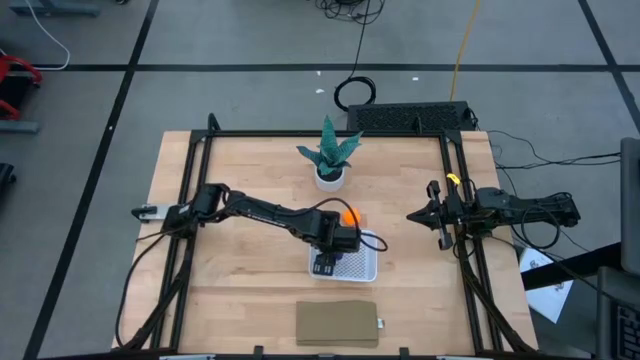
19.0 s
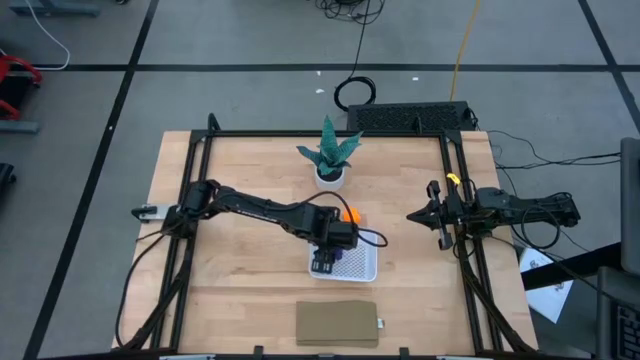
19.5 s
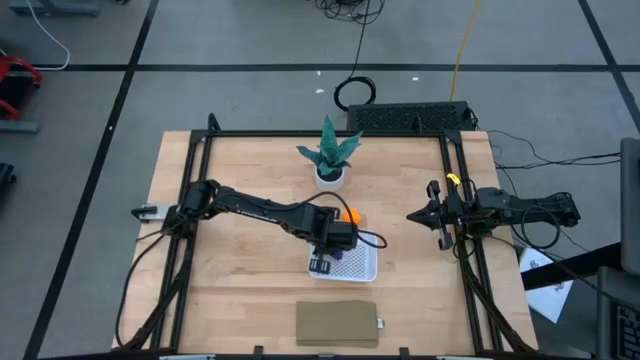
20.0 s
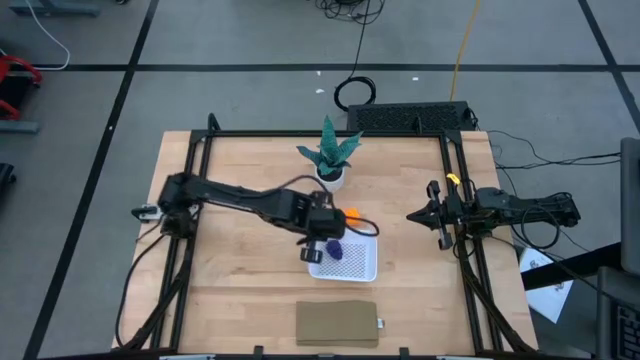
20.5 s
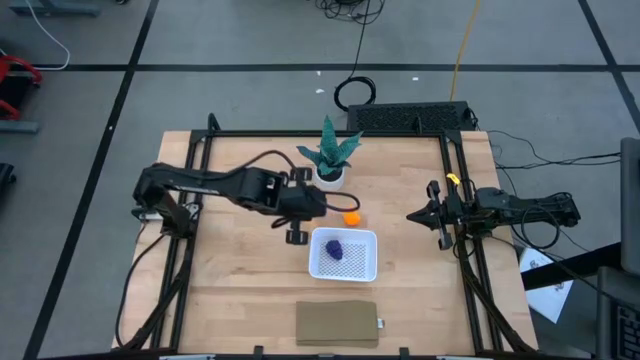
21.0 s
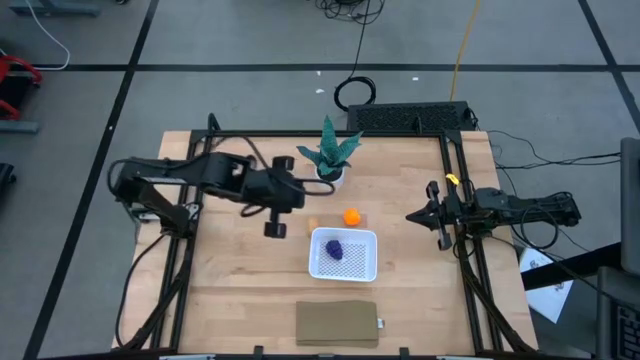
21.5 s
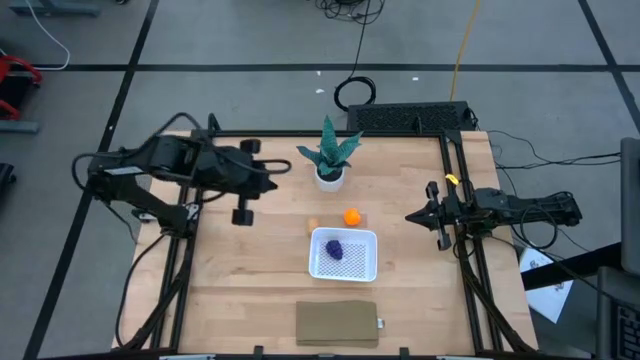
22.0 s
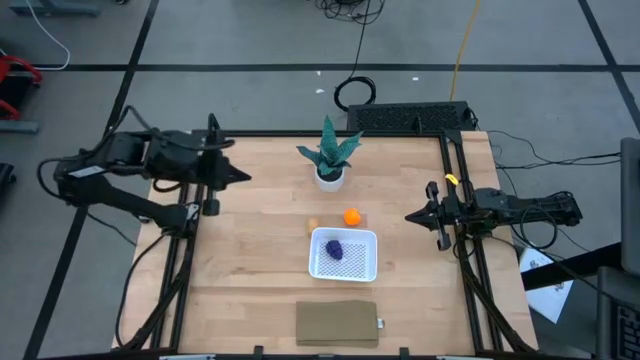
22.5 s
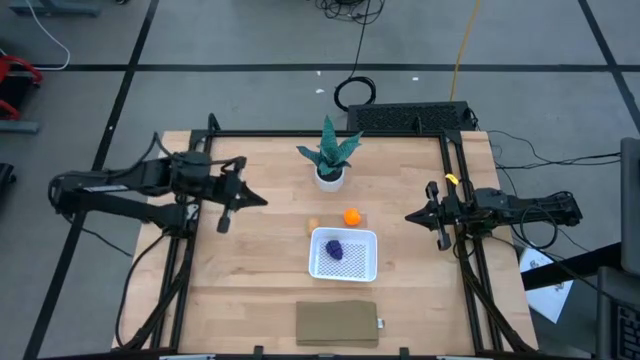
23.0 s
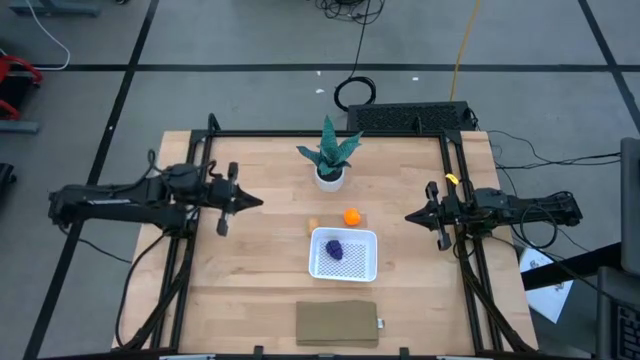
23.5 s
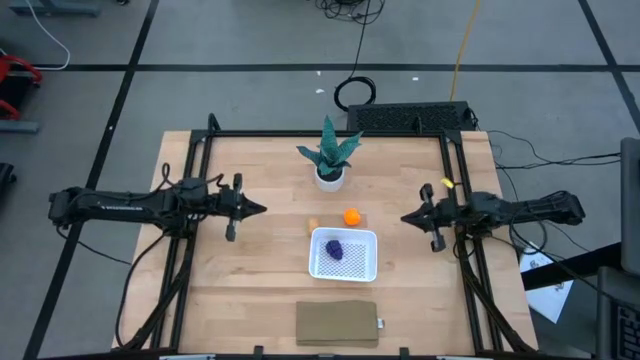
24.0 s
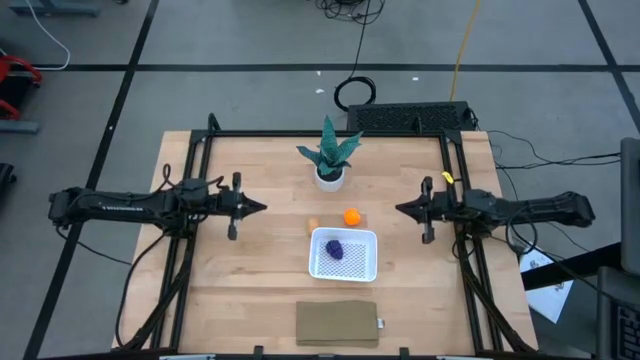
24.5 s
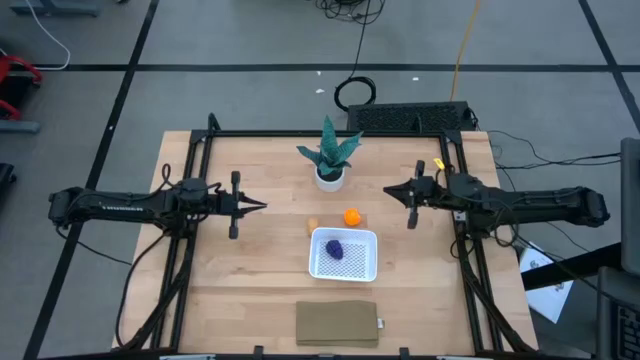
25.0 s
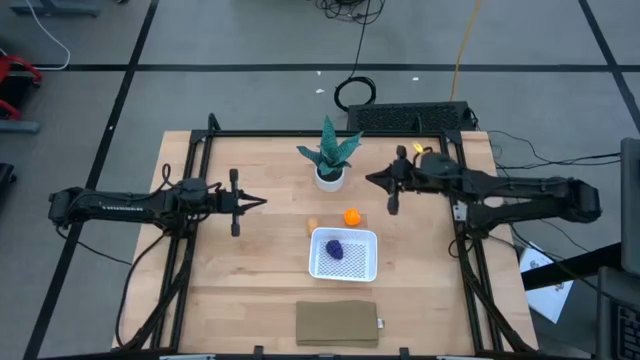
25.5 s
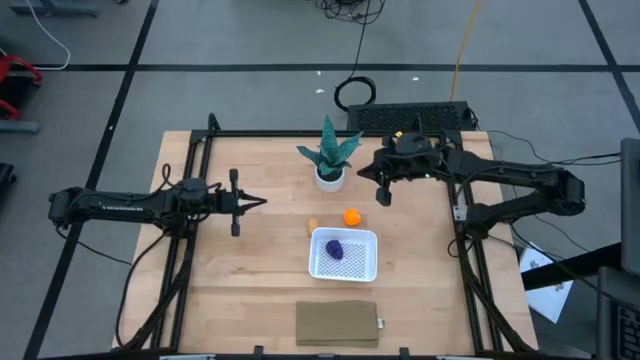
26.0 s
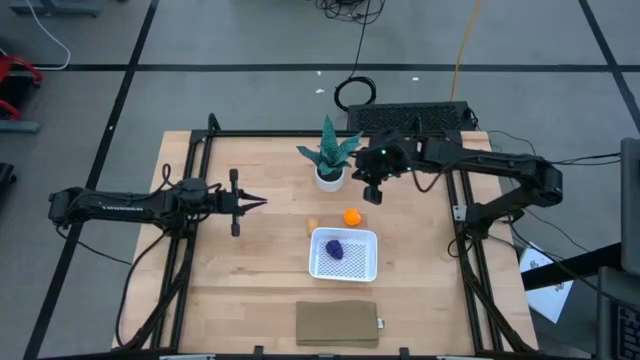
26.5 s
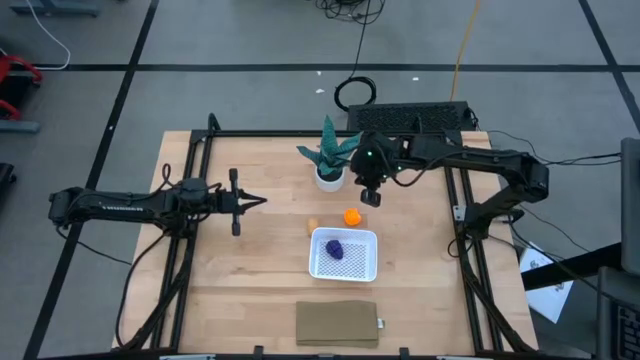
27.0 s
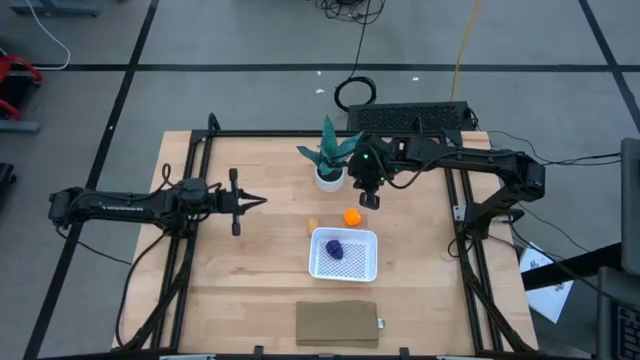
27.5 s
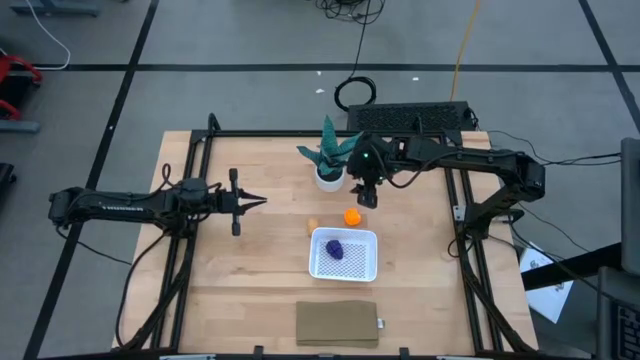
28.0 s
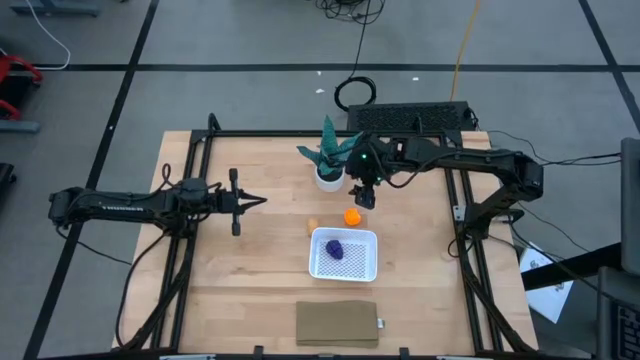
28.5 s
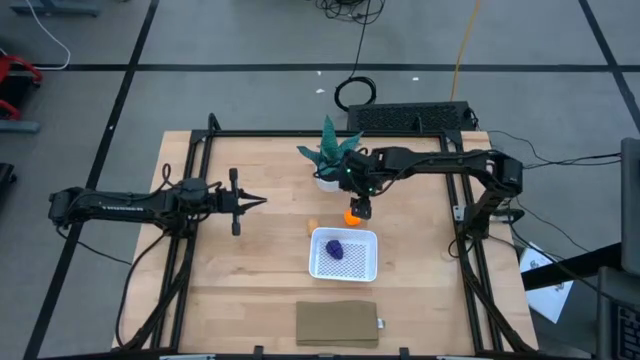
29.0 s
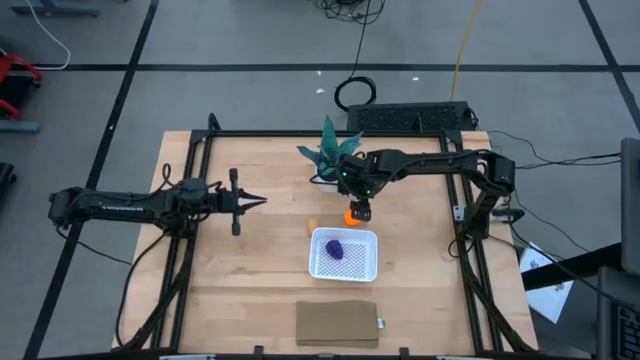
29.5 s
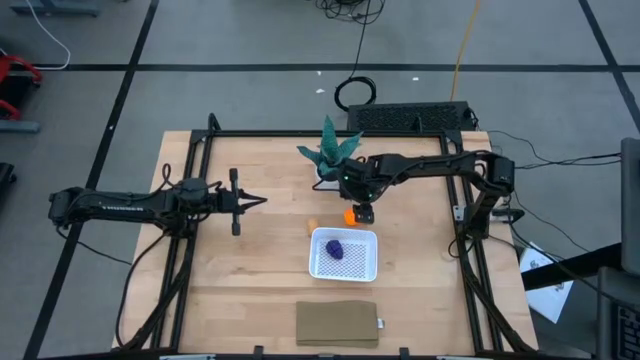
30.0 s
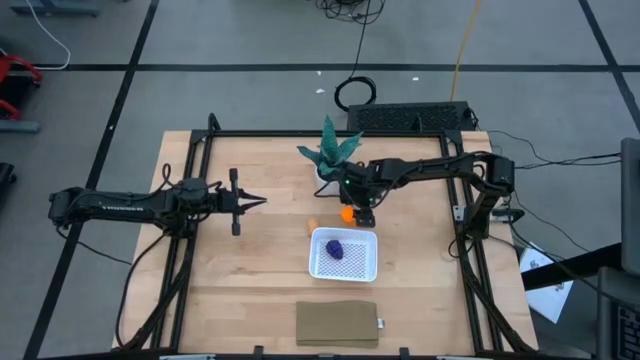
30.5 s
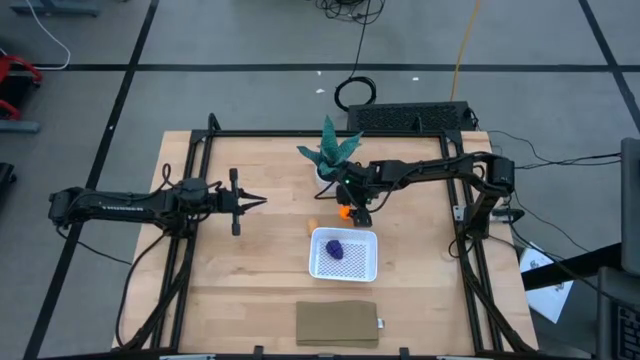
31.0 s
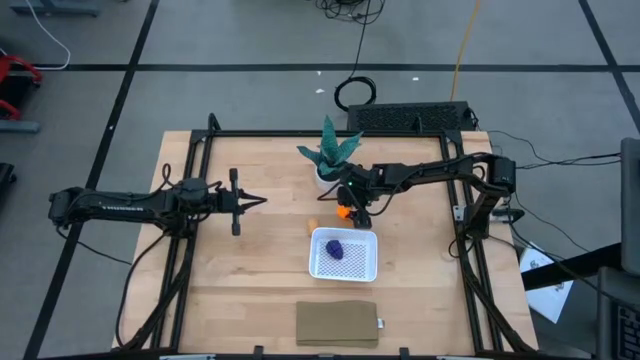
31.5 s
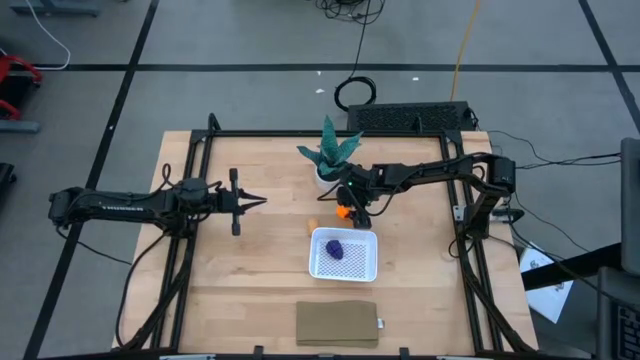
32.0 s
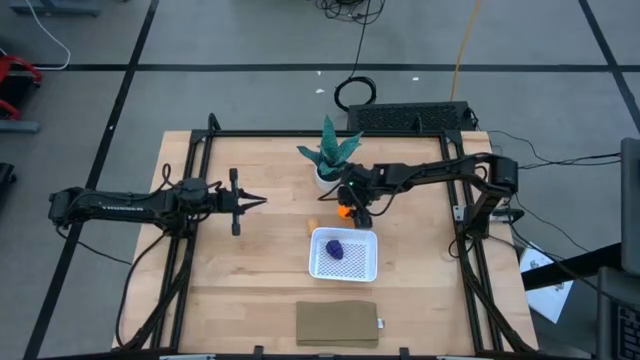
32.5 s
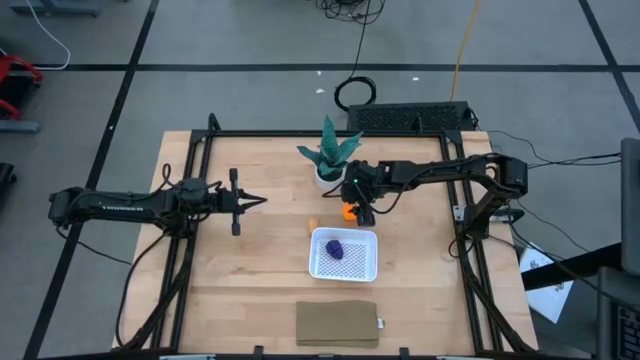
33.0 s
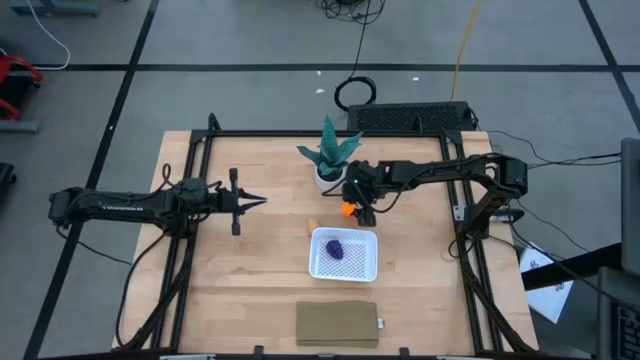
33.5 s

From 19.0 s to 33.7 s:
Task: Pick and placing Produce into tupperware
Put the orange into the white bin
